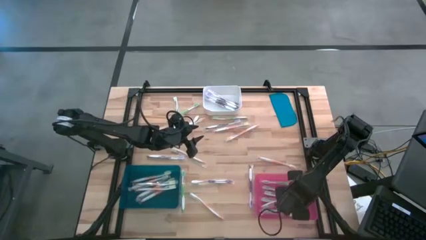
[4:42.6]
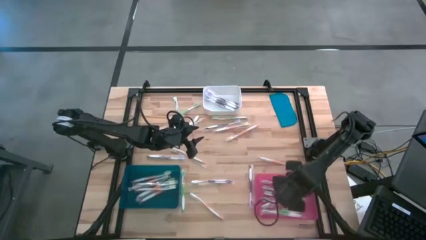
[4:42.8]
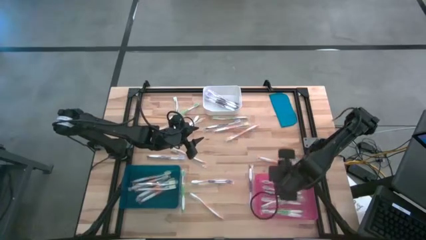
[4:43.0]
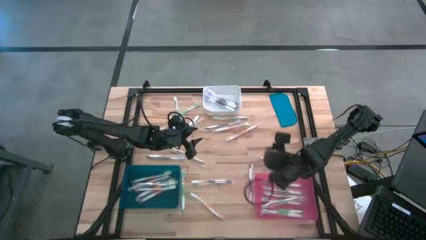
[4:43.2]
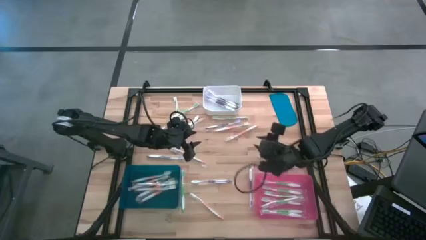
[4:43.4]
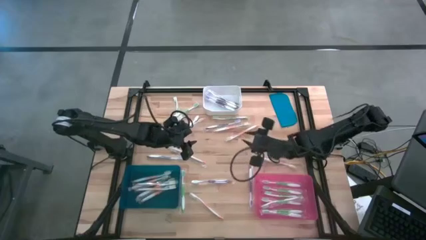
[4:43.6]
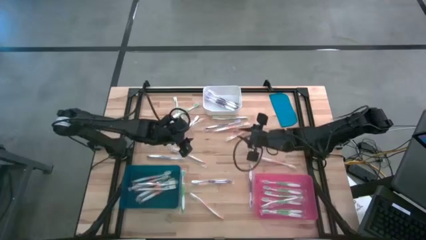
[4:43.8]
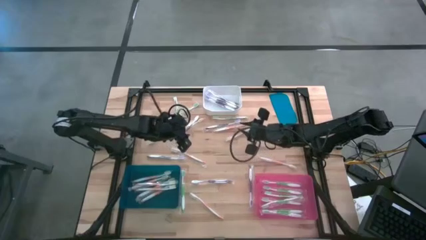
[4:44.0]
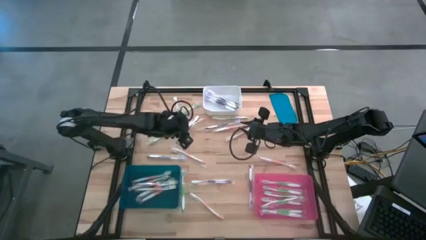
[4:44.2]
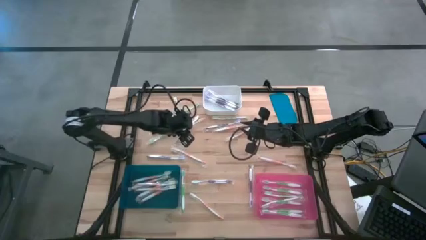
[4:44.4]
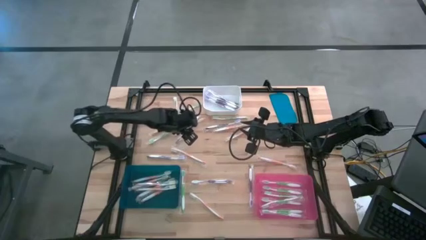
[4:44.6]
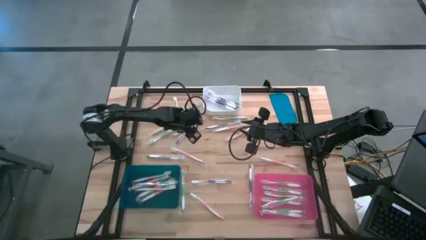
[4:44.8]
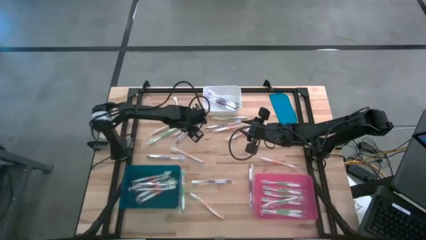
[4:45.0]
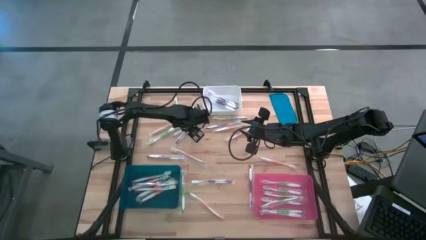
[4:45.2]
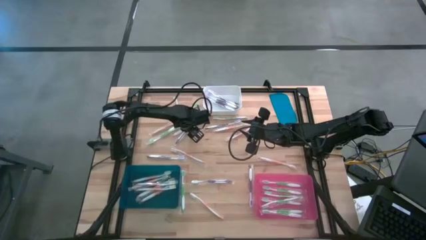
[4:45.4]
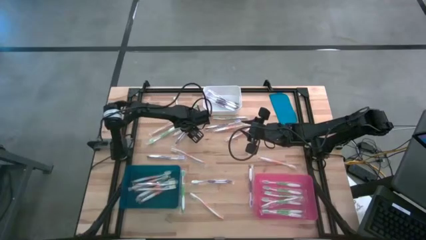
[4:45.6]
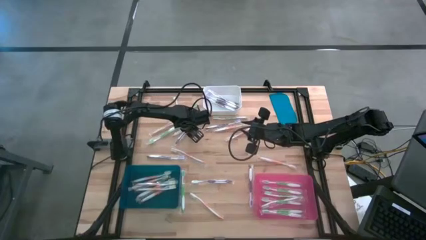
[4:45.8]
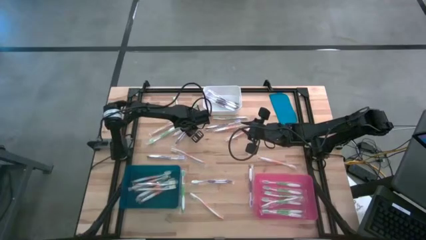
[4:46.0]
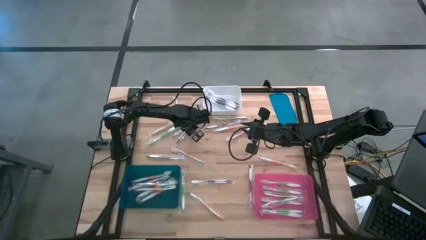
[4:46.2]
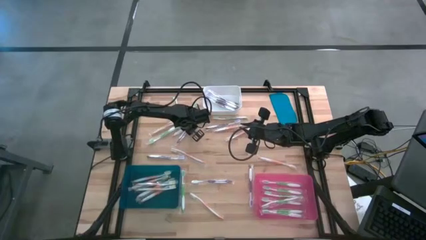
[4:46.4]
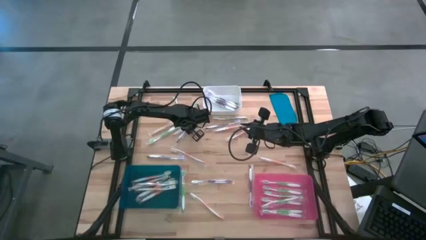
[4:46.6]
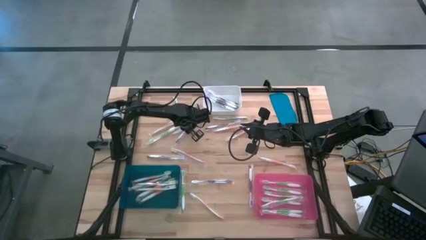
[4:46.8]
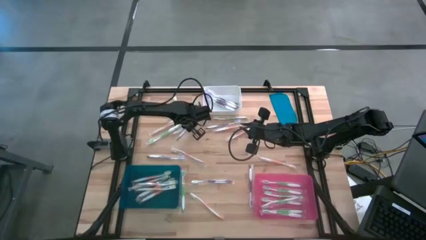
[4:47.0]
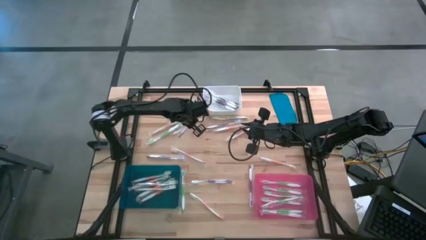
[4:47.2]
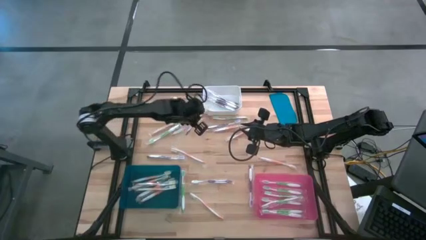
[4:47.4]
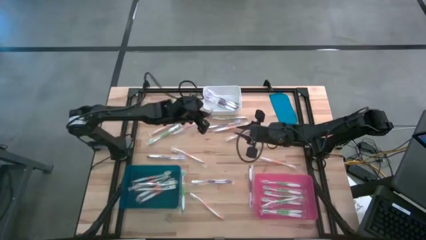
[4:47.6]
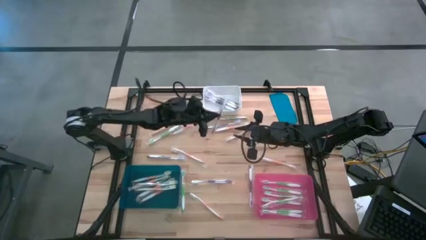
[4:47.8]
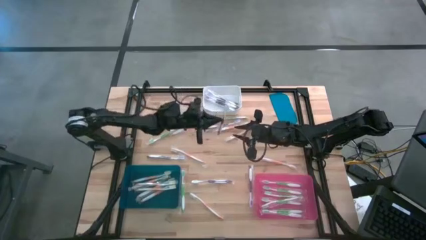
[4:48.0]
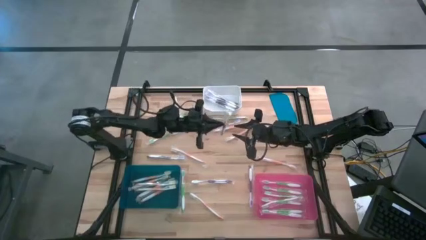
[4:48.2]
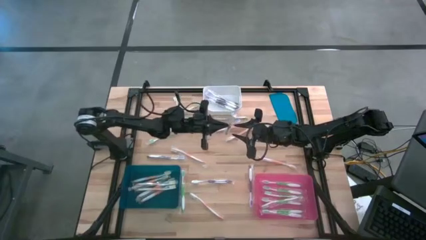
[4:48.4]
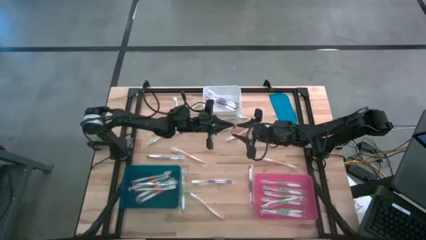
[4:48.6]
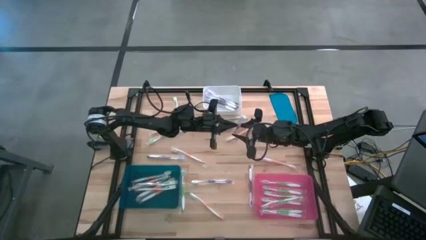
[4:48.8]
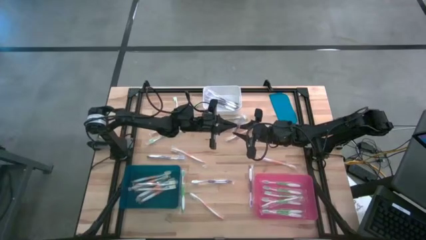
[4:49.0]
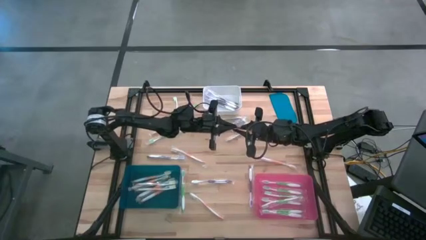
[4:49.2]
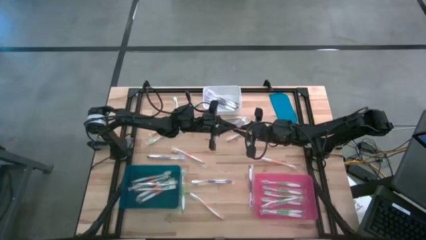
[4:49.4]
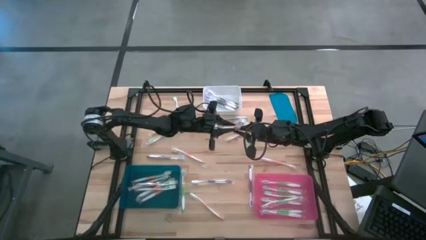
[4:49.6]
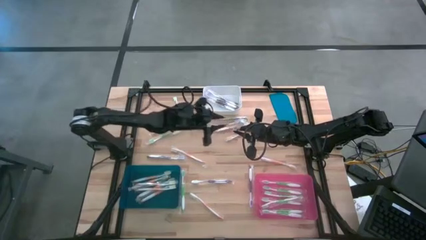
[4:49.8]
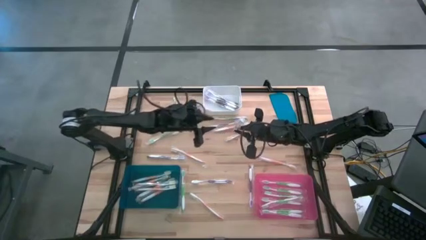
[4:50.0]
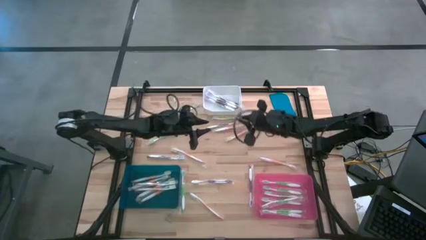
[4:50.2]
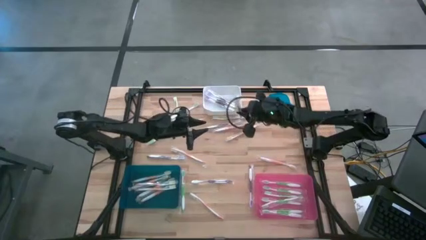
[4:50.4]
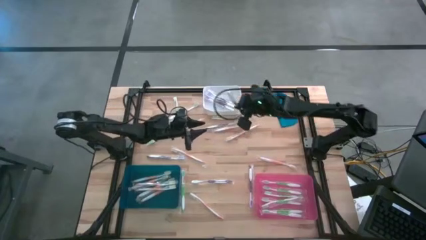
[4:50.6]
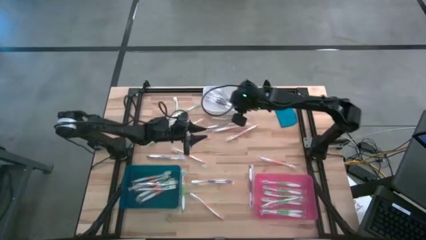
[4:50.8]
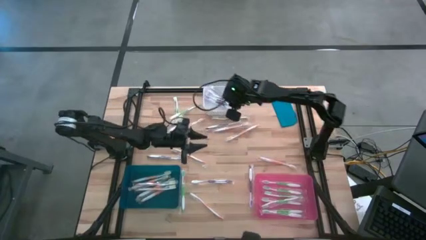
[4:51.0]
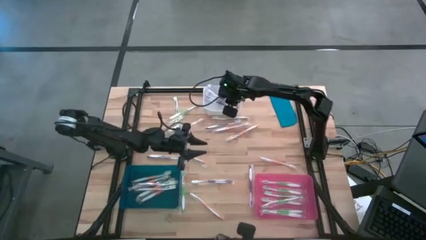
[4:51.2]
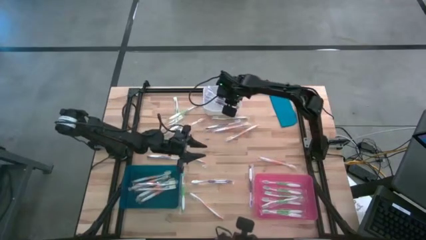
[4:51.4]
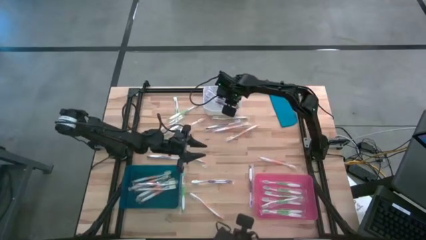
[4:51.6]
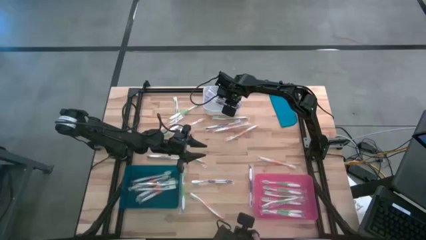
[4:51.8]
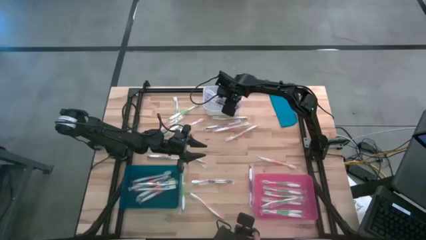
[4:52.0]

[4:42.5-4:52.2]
Task: Pick & Place Toothbrushes
Put the violet toothbrush into the white bin
